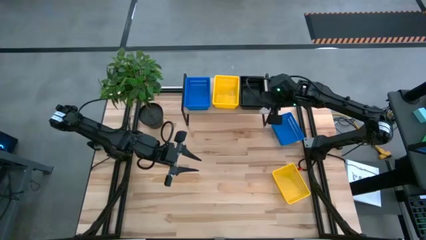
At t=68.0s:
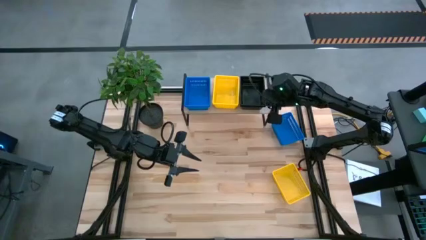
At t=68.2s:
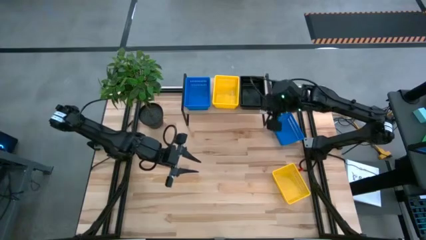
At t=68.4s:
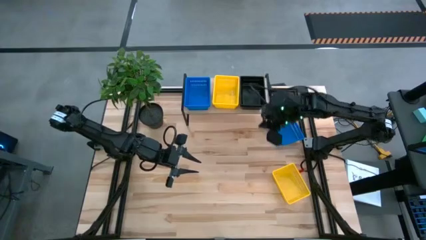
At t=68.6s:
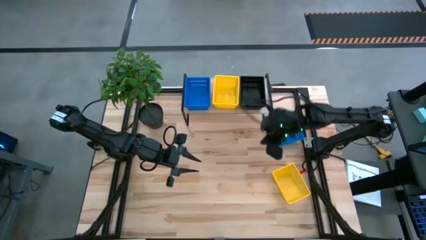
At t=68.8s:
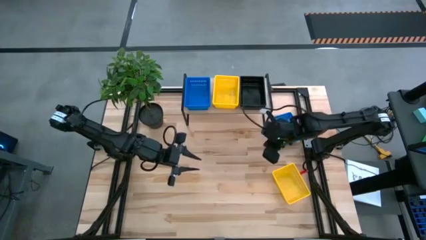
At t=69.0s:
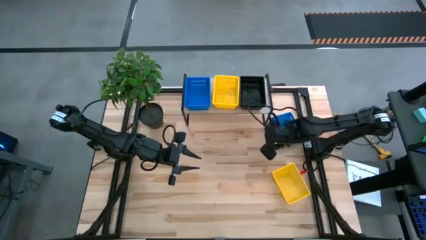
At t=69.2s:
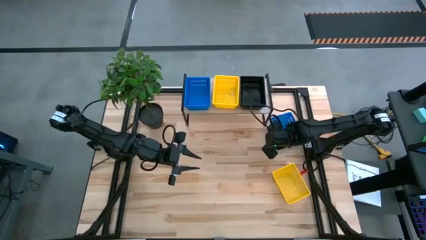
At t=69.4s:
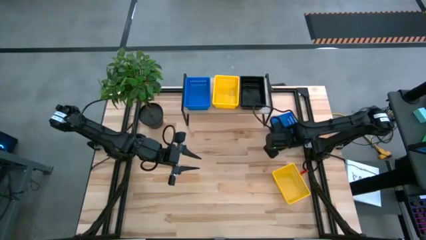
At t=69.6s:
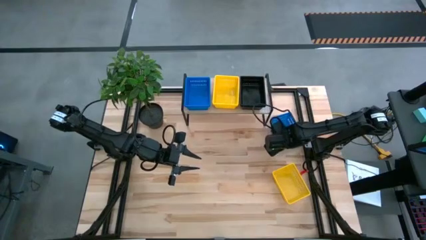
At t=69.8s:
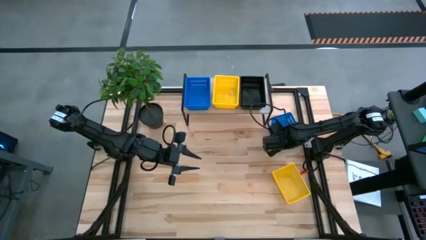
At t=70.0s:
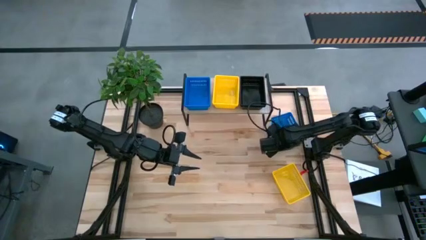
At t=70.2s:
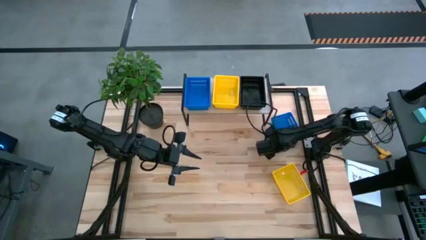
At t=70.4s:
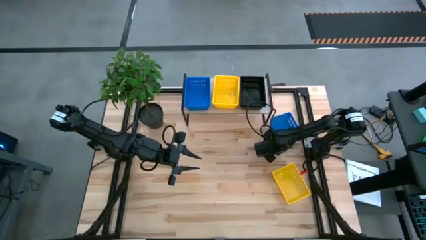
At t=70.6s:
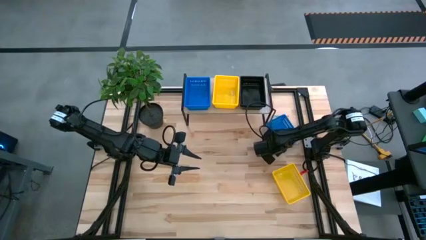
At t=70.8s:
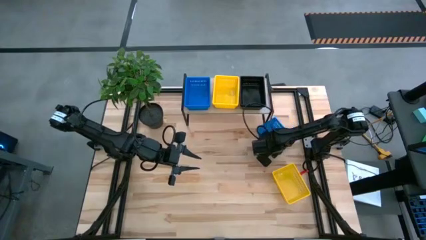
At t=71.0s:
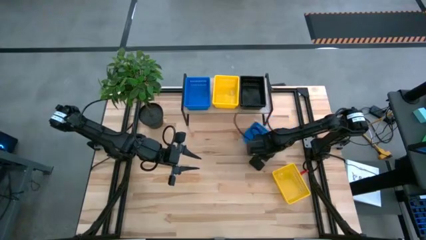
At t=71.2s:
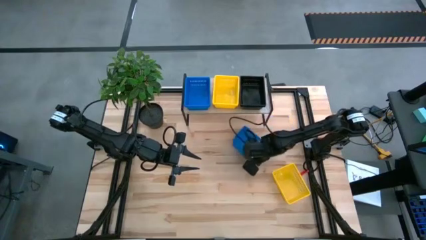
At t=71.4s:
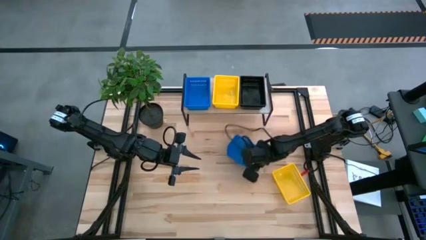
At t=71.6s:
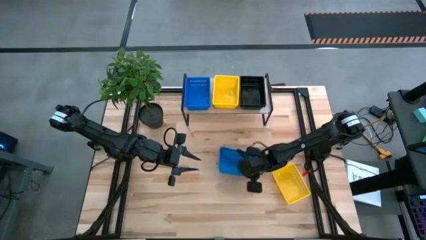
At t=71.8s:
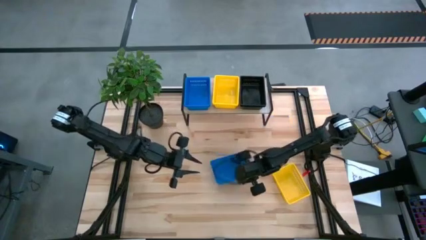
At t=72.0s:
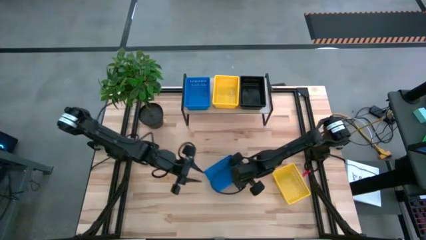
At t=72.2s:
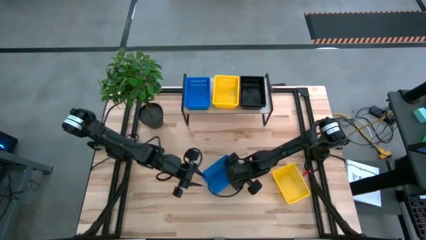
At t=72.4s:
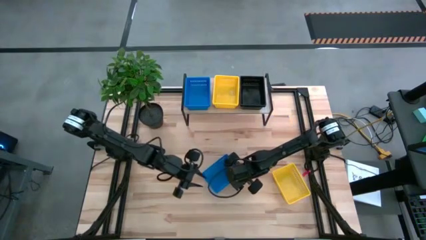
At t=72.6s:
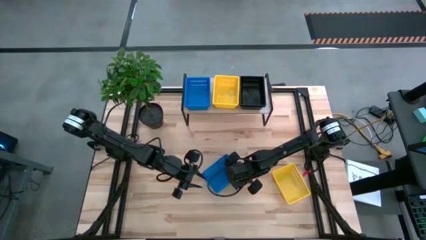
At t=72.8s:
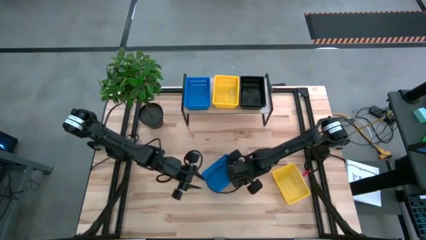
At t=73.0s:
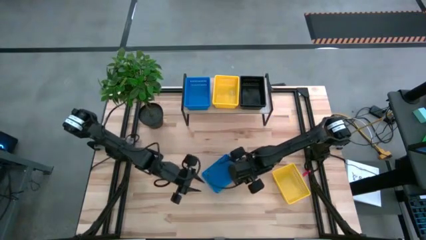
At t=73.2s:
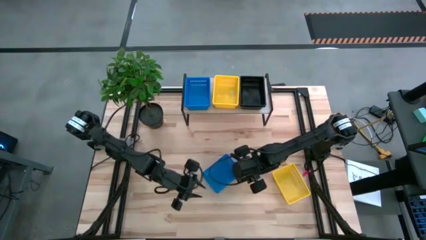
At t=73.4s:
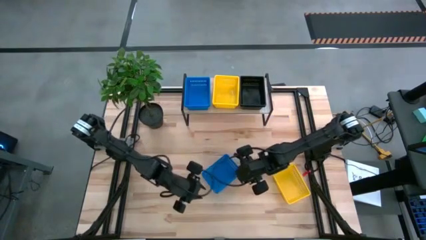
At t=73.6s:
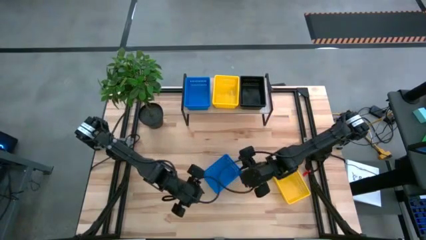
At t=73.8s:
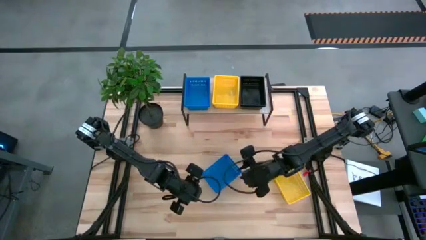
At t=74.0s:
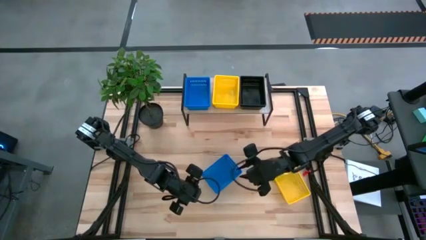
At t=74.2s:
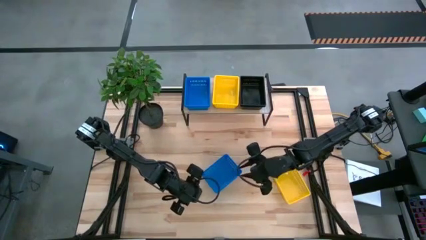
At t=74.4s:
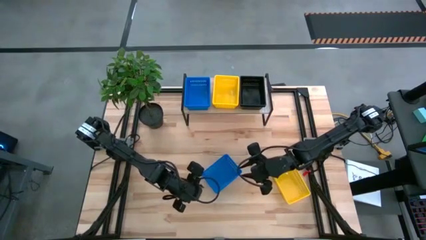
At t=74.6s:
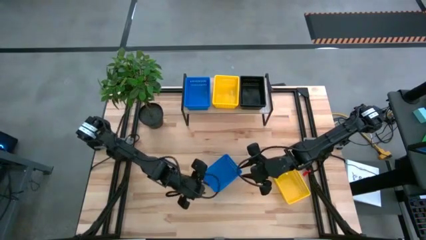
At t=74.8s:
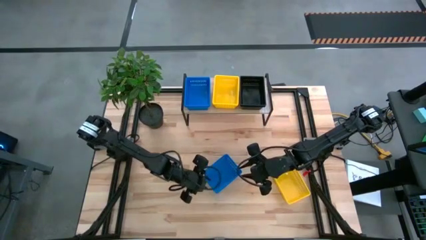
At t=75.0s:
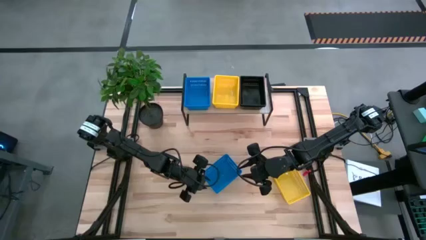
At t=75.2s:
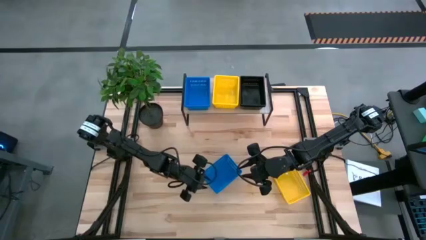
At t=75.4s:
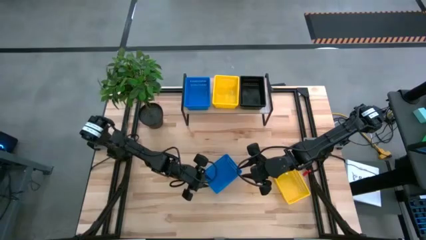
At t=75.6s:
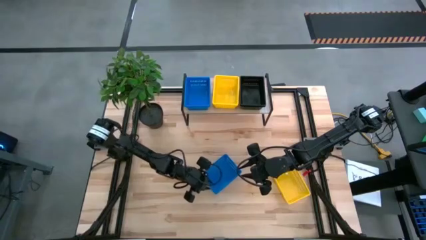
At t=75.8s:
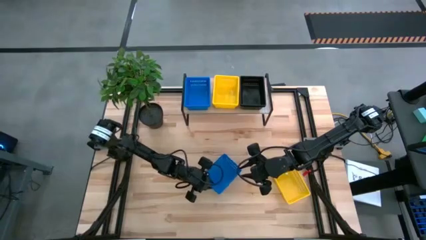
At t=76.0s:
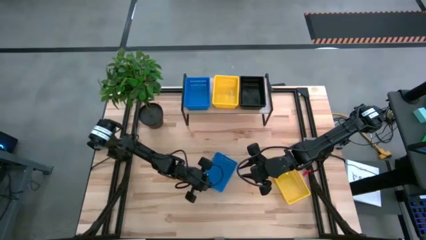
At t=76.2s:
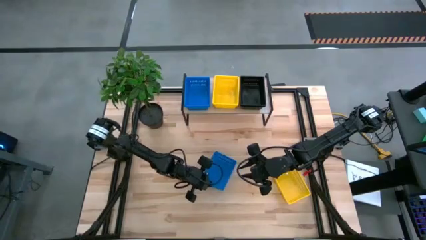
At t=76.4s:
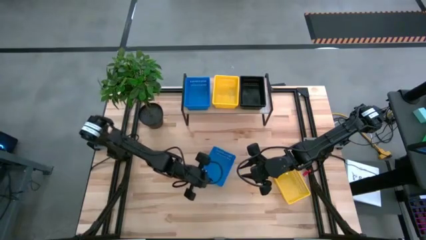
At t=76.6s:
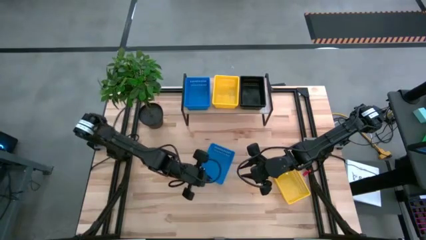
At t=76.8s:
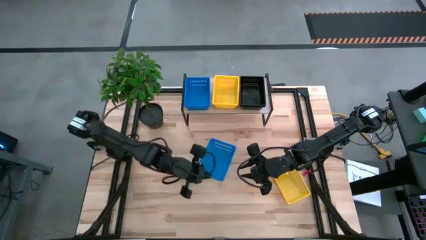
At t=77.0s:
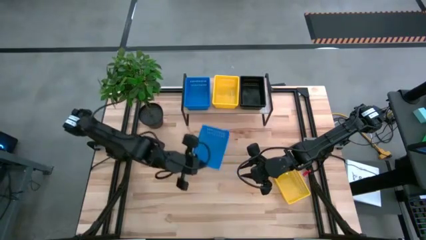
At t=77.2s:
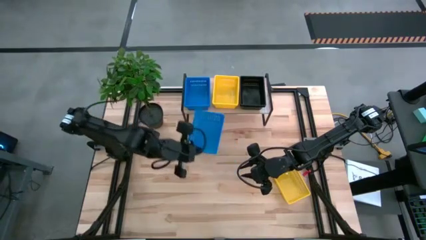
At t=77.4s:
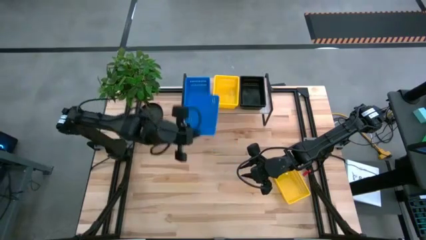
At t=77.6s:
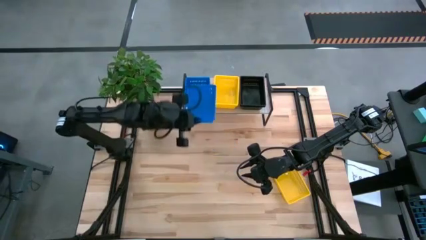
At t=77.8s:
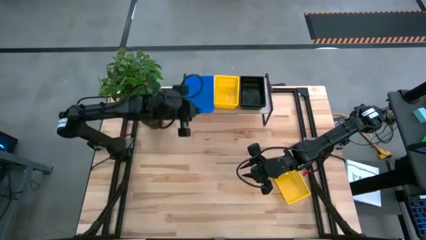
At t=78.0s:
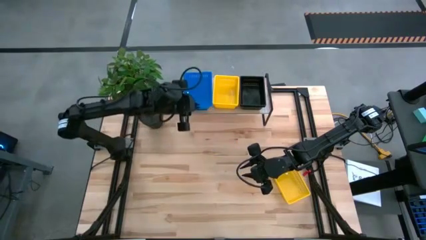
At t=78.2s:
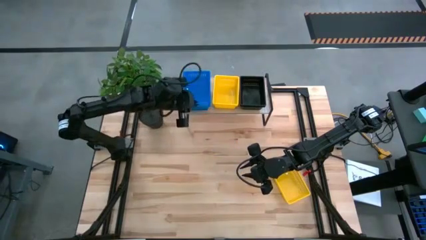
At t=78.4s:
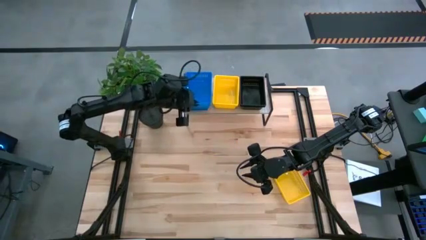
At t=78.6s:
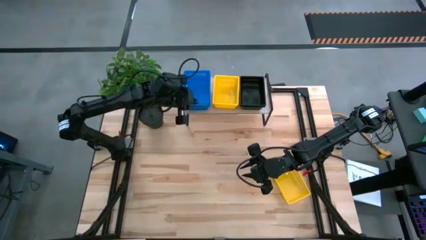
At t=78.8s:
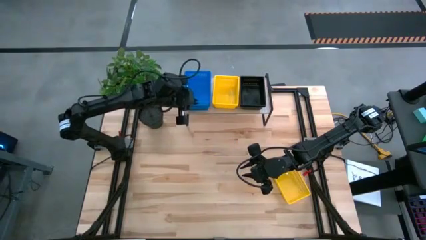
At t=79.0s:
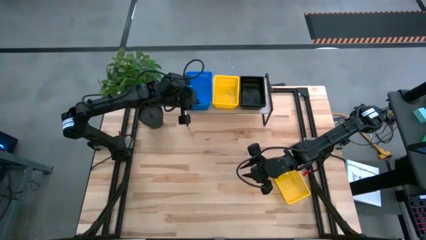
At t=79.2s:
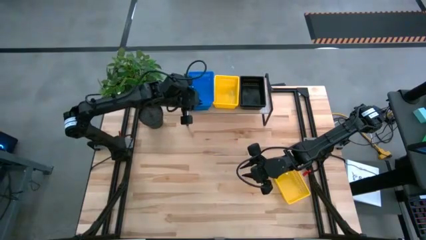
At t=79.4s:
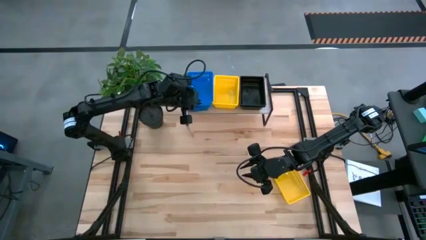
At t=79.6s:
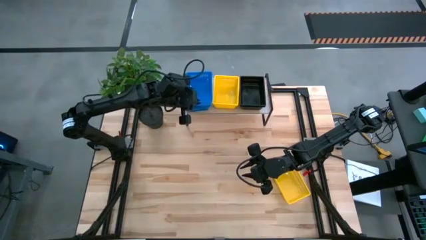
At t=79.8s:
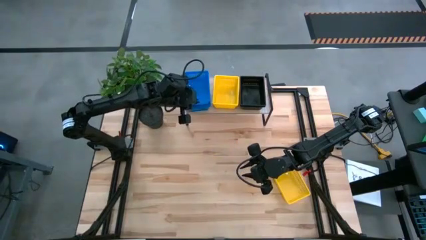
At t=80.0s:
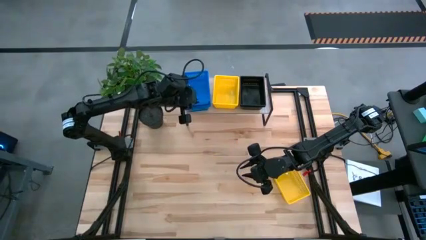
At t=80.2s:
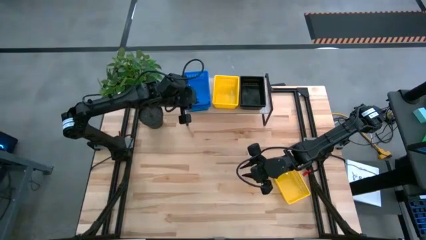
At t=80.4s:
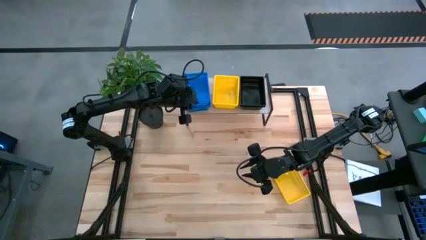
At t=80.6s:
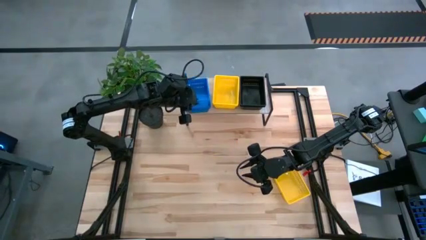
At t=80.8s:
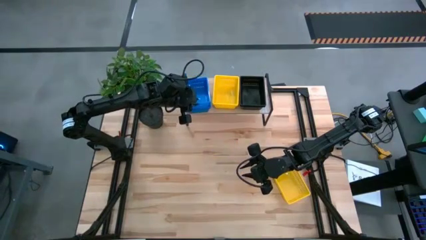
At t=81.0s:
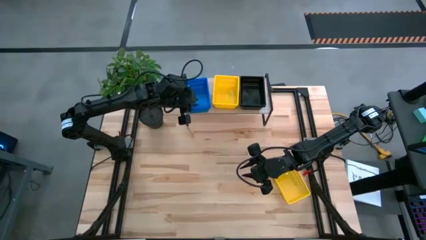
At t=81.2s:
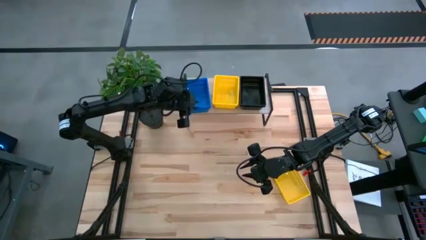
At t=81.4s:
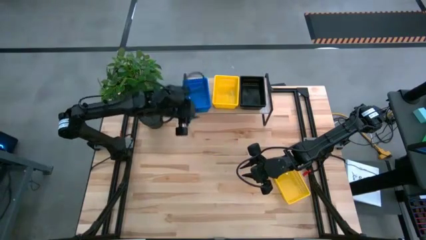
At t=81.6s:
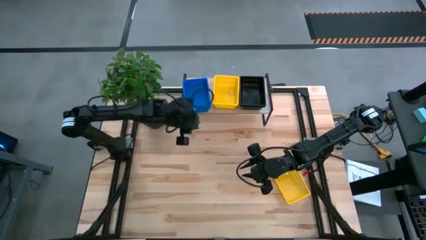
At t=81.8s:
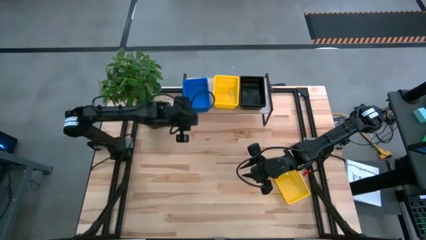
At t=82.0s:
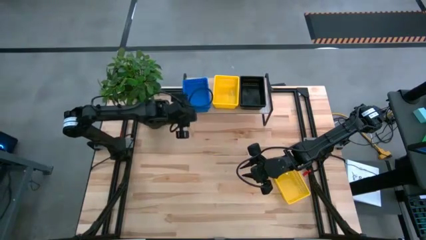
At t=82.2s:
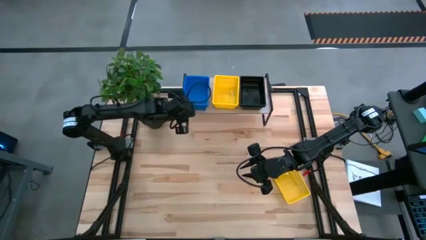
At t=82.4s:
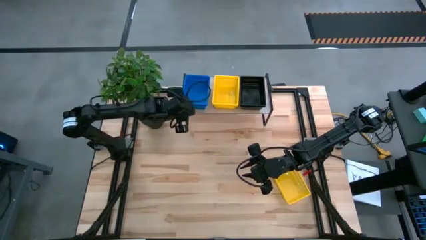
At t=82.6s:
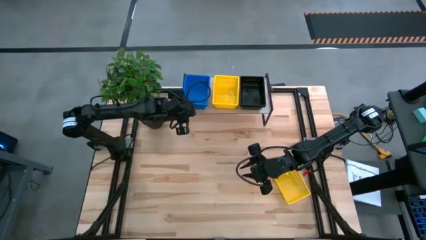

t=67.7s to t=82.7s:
Task: Stack baskets on shelf by color
Stack the blue bin on top of the other blue bin on the shelf
